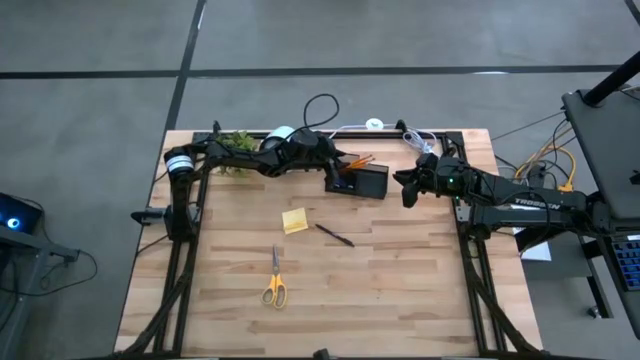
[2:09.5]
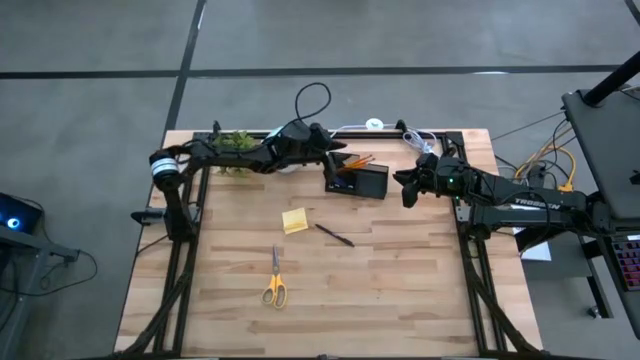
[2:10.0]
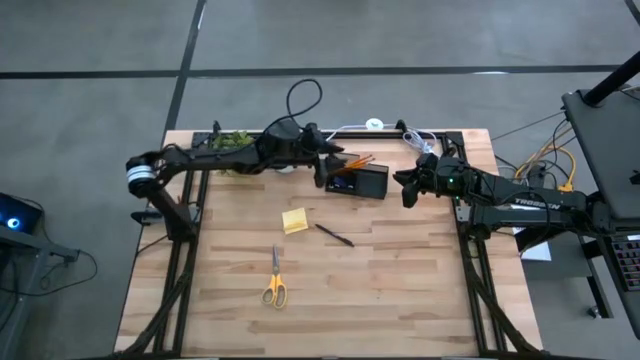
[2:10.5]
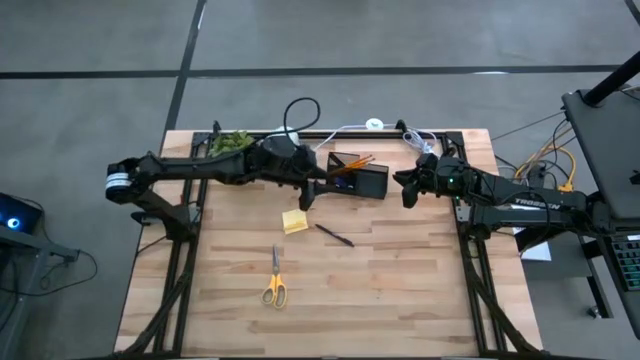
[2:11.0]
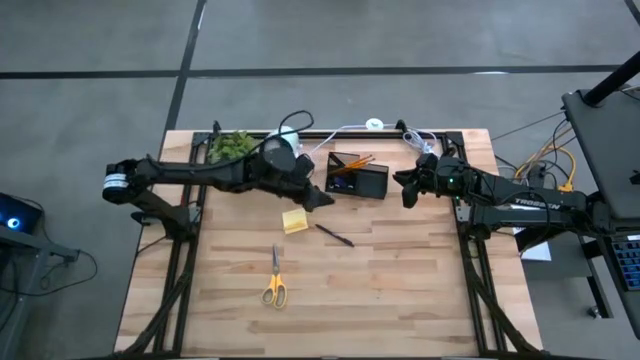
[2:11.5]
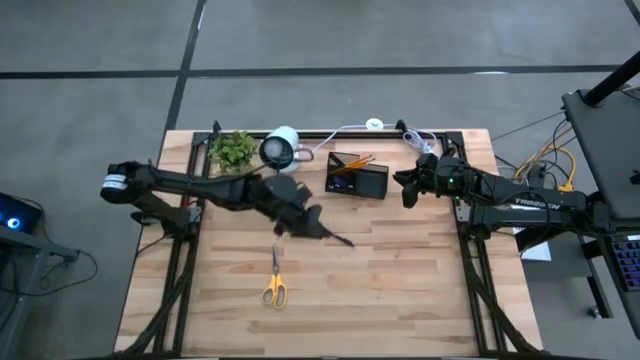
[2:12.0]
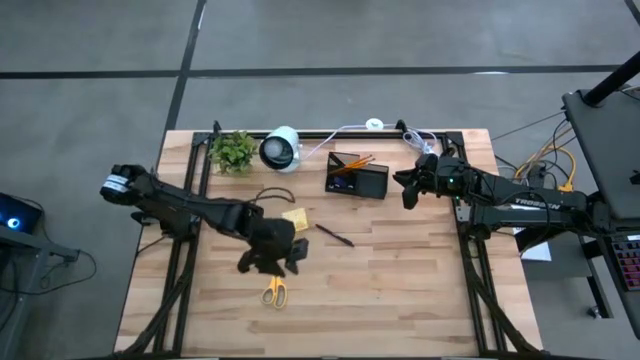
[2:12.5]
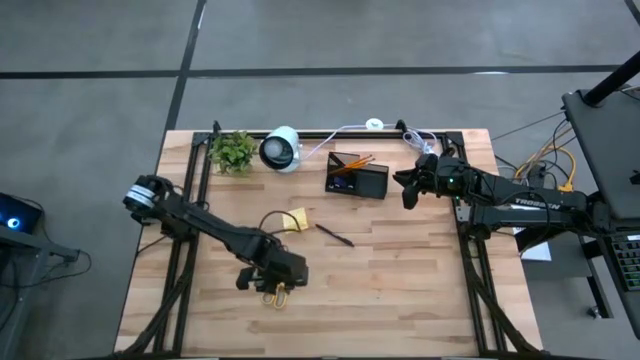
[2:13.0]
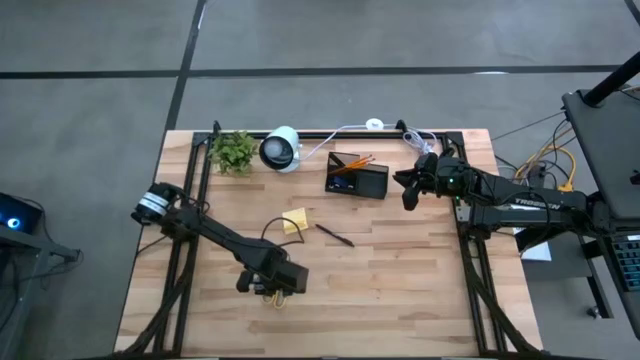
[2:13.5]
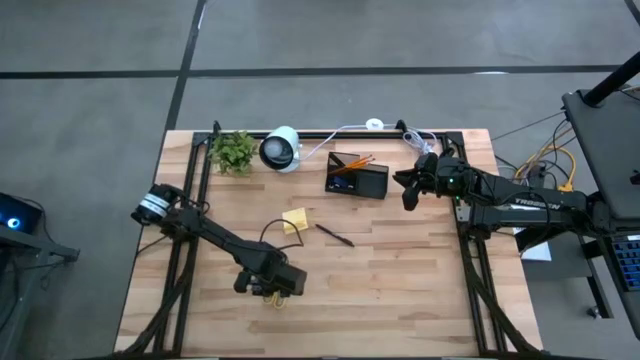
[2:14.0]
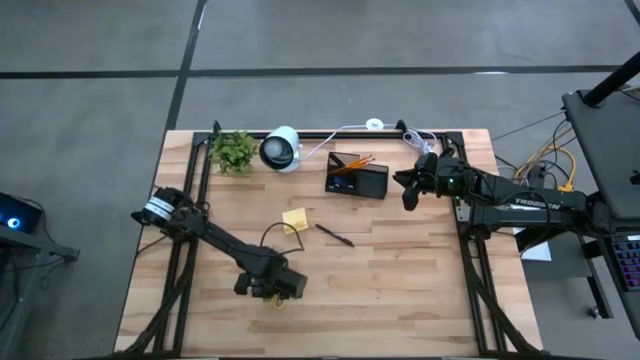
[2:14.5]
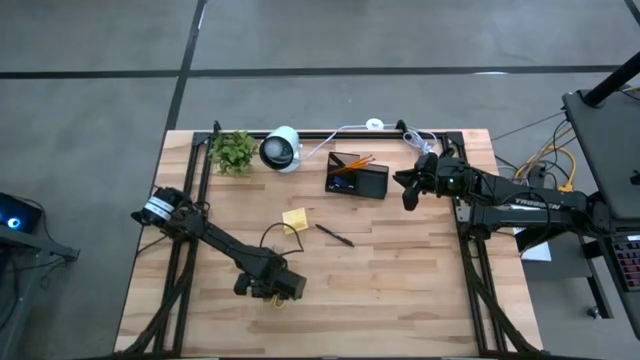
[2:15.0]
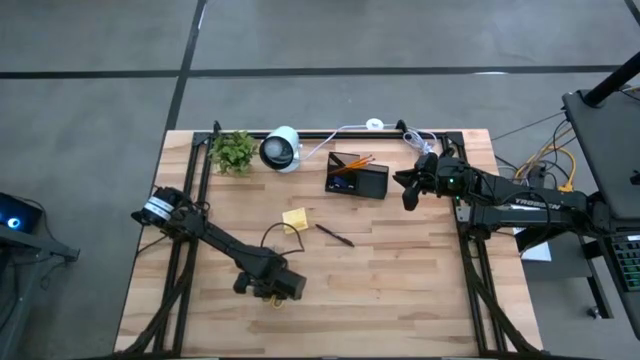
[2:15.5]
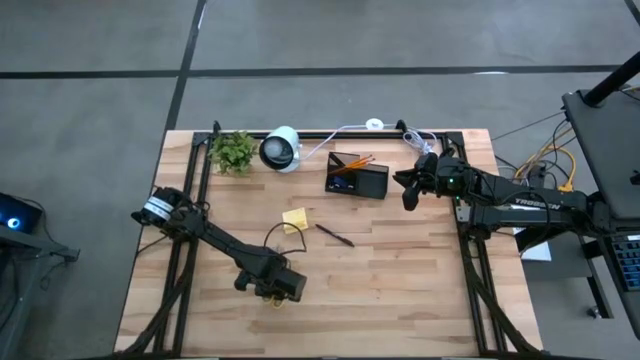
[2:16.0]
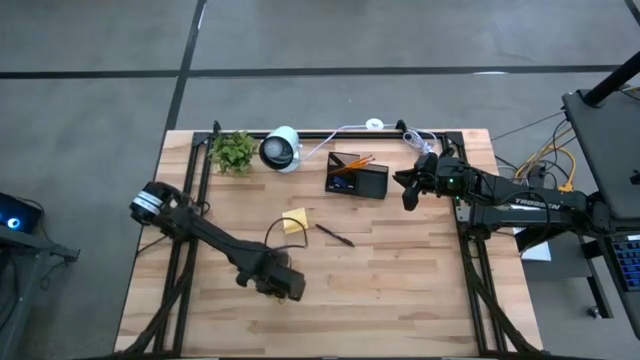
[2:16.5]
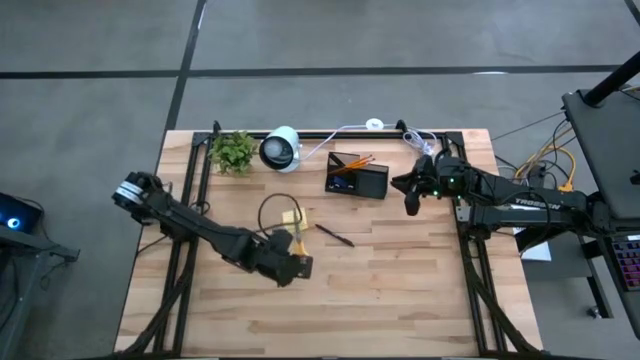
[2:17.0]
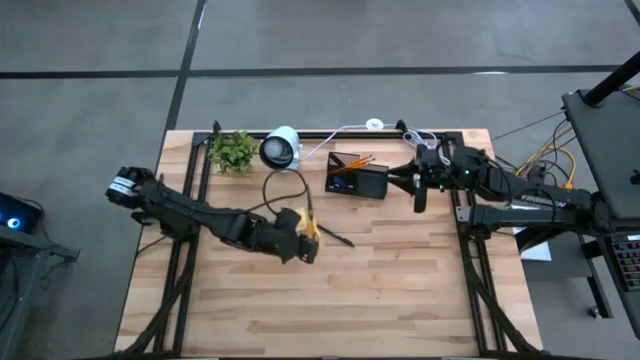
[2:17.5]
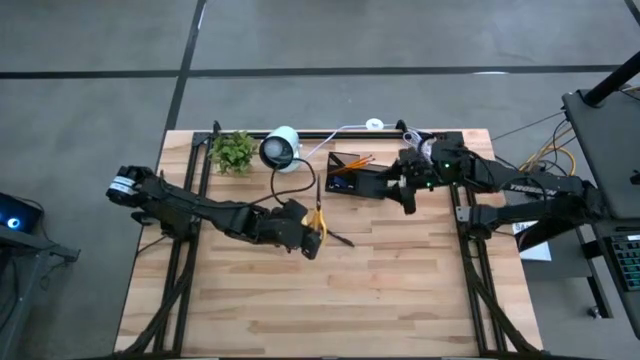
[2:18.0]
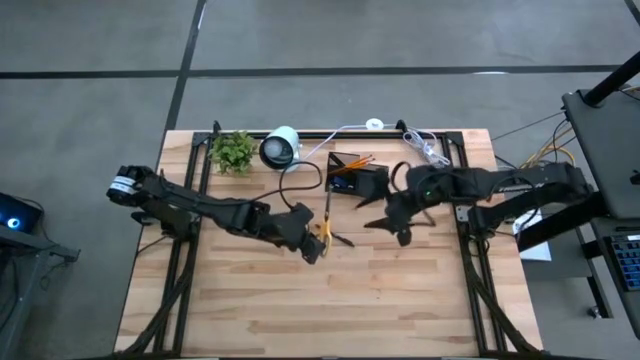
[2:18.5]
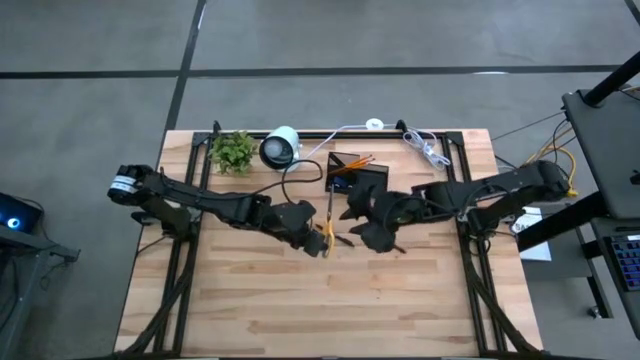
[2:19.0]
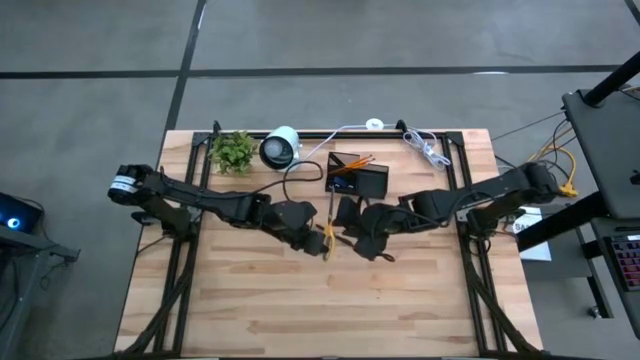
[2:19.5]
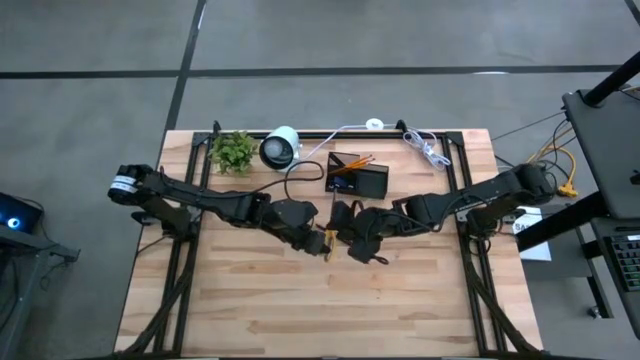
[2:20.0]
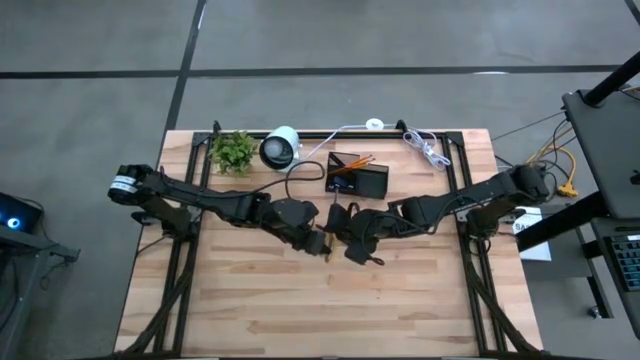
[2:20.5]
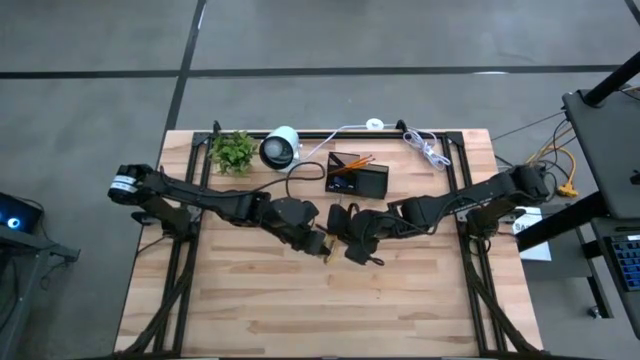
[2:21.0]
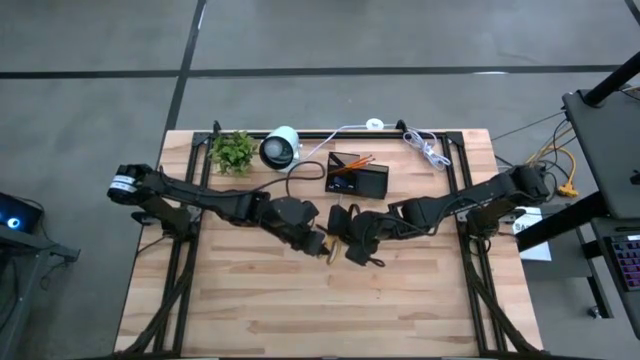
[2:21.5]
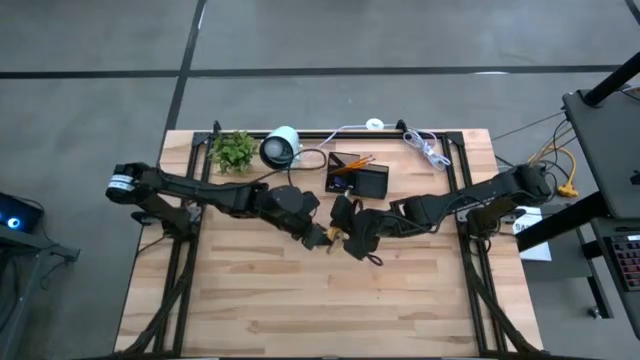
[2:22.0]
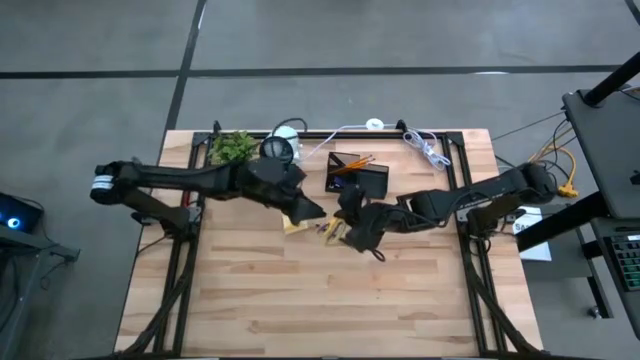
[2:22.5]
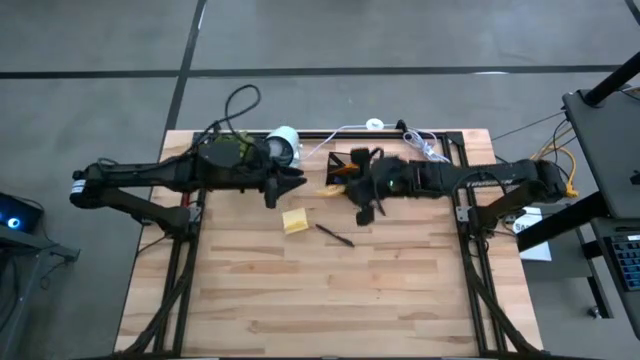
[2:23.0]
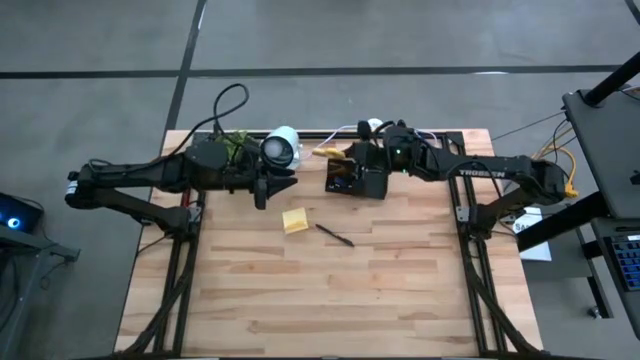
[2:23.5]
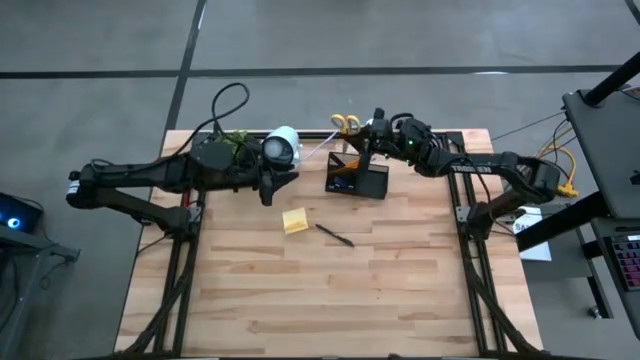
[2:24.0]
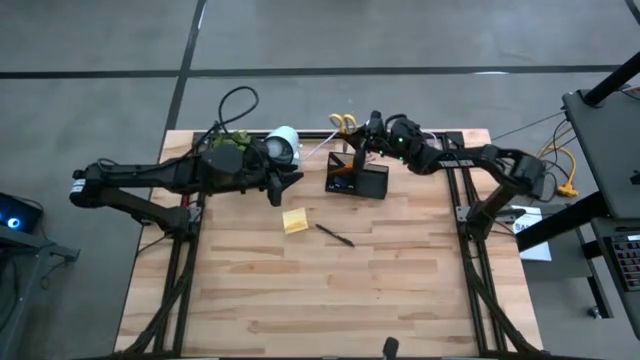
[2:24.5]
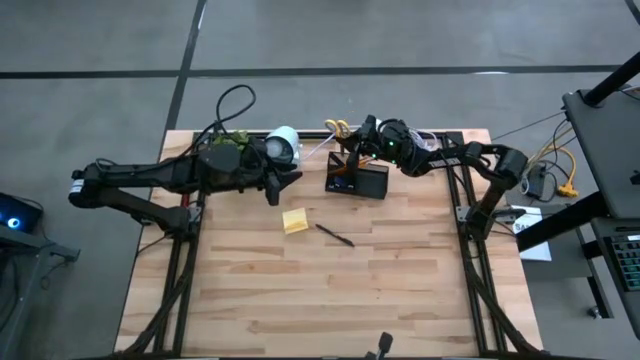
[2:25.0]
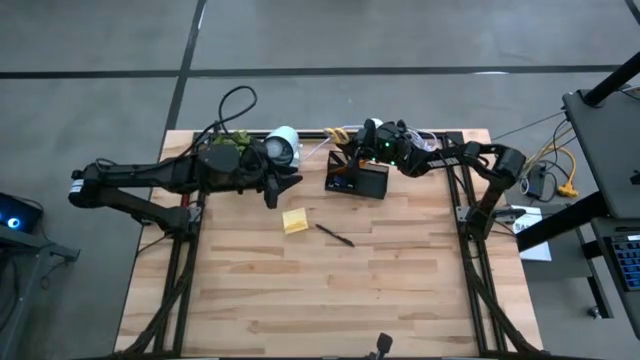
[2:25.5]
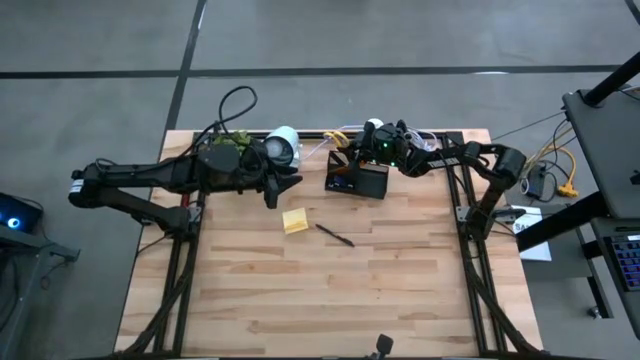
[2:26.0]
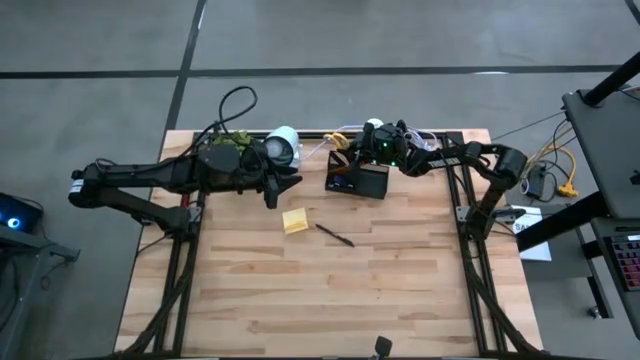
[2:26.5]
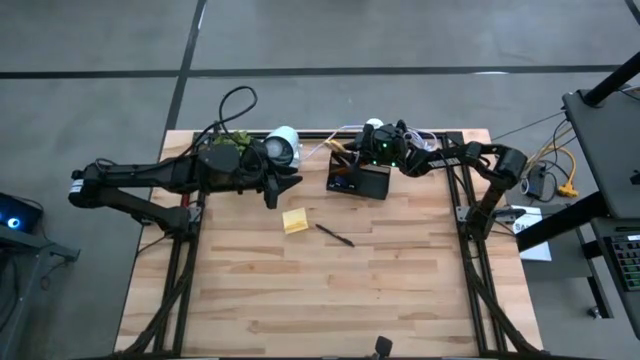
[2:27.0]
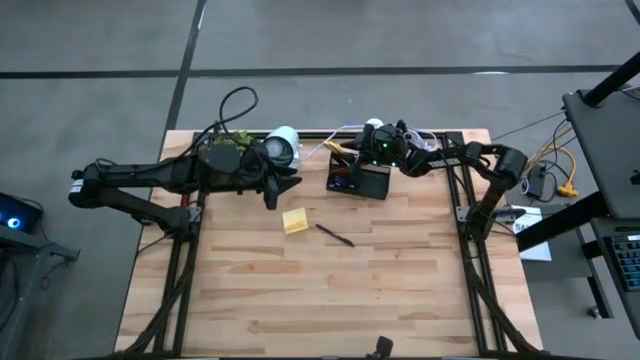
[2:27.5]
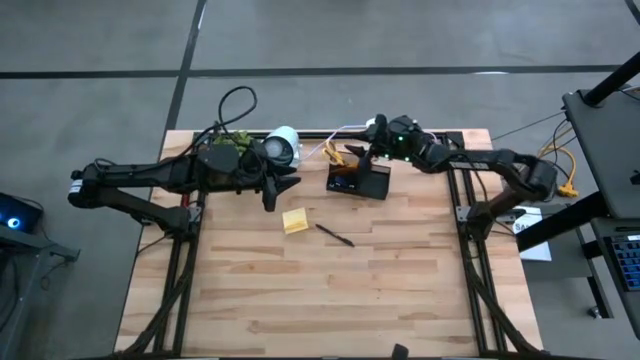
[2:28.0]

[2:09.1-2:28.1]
Task: Pick and place office supplies into organizer
Put the scissors into the desk organizer

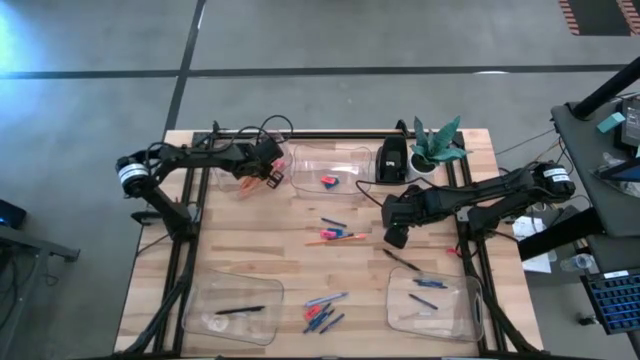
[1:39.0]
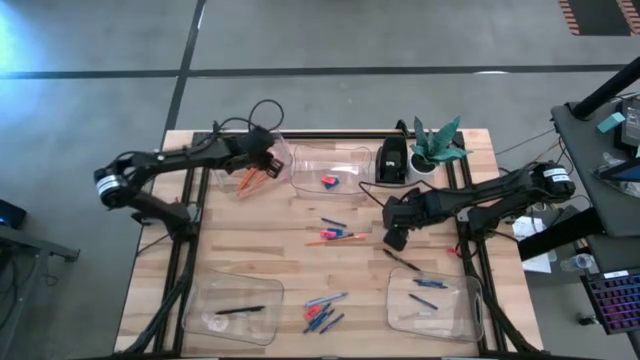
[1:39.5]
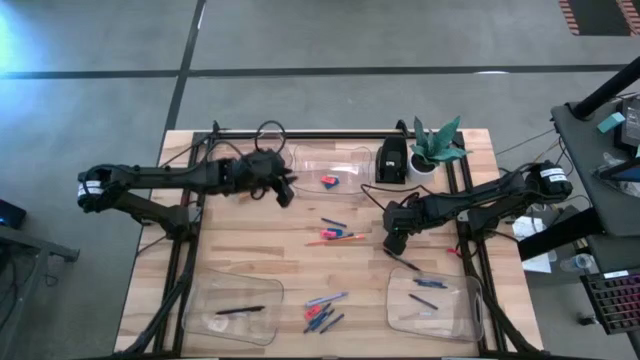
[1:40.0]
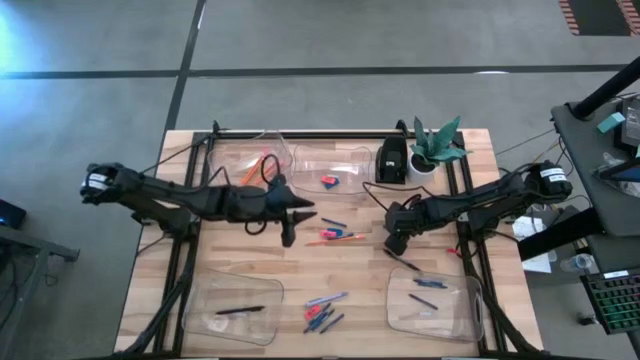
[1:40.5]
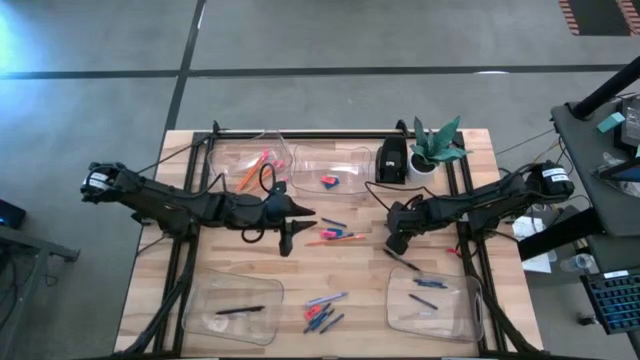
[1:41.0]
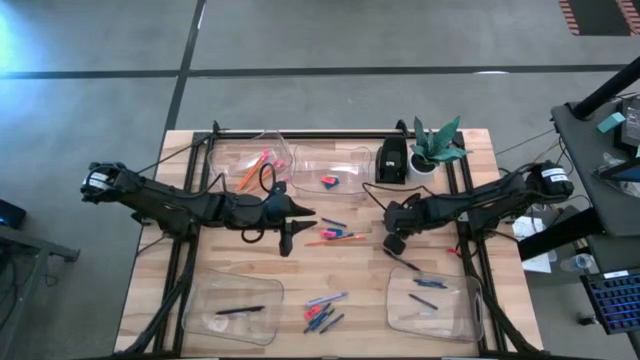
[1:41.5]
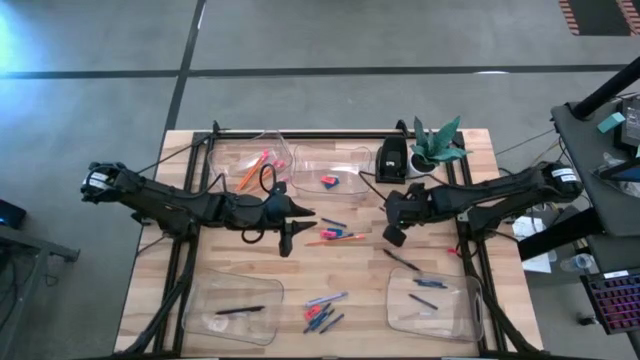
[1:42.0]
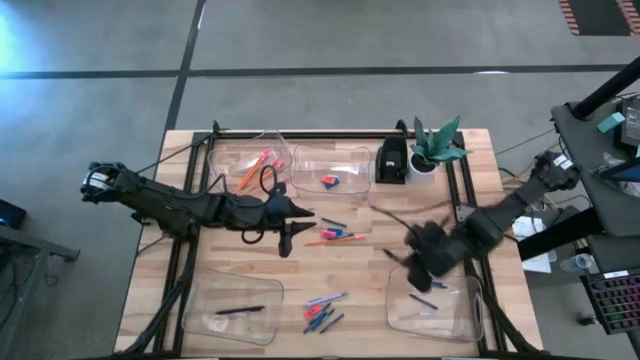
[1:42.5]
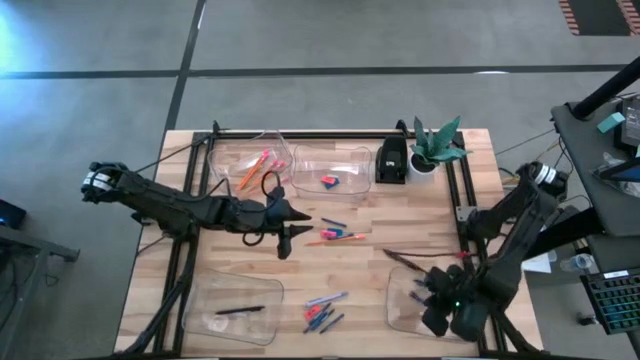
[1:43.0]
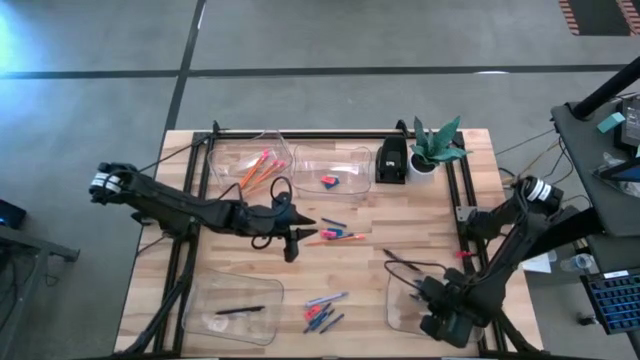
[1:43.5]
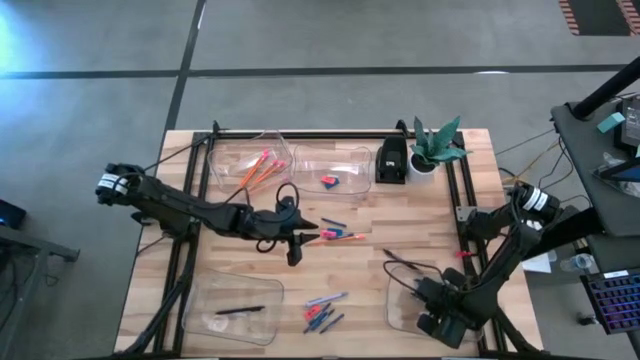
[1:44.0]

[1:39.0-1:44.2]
Task: Sort crayons/erasers/pens/pencils in bins
Put the dark blue crayon into the bottom right transparent bin
